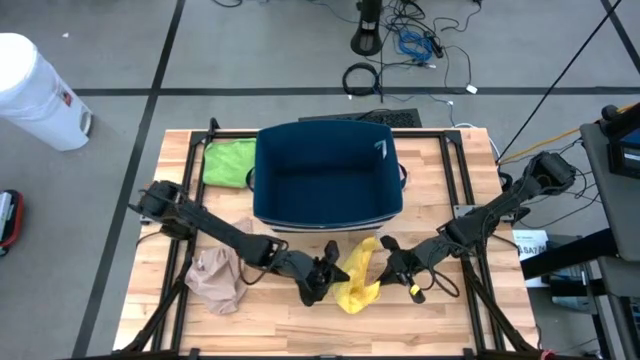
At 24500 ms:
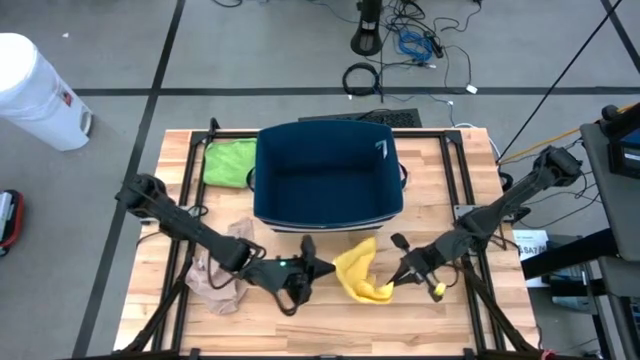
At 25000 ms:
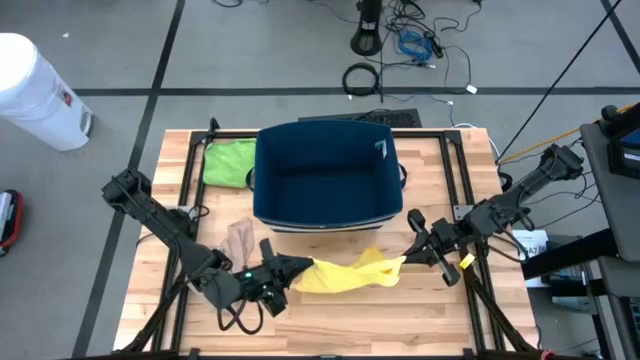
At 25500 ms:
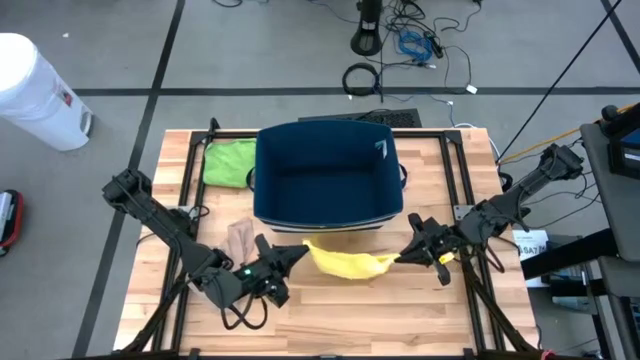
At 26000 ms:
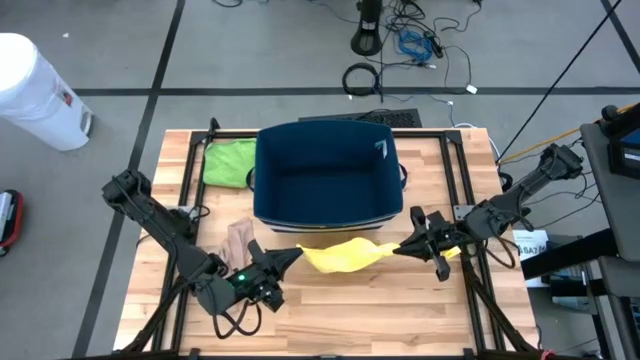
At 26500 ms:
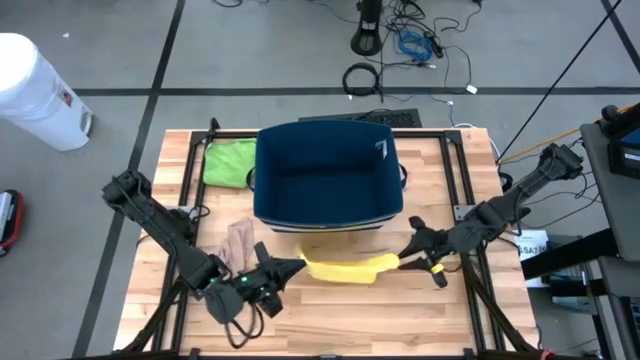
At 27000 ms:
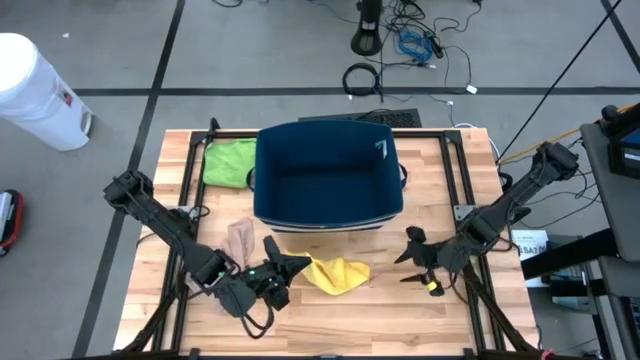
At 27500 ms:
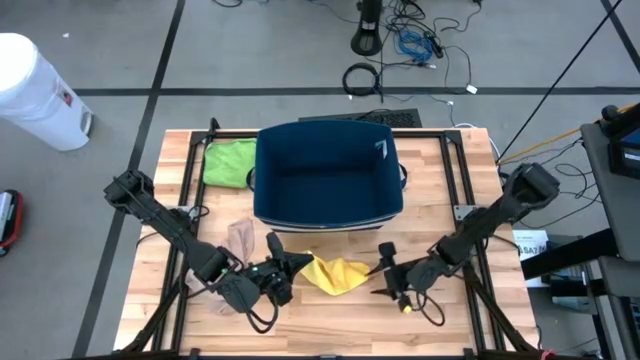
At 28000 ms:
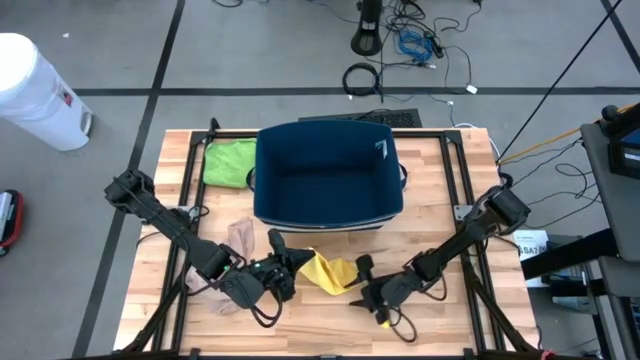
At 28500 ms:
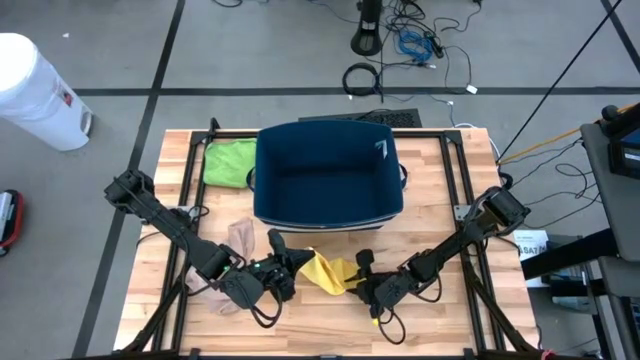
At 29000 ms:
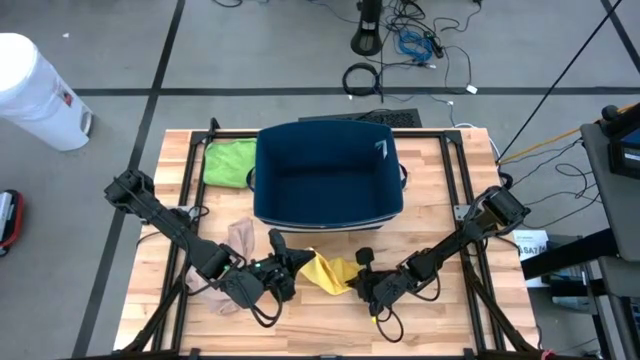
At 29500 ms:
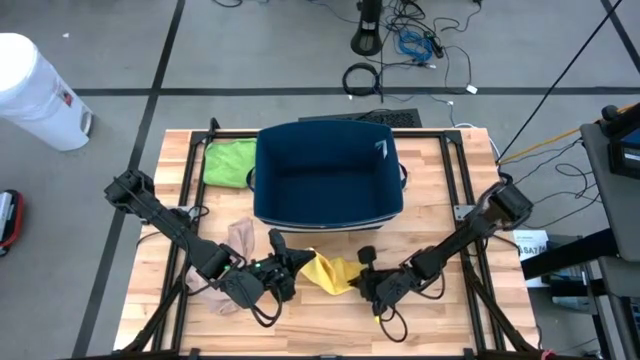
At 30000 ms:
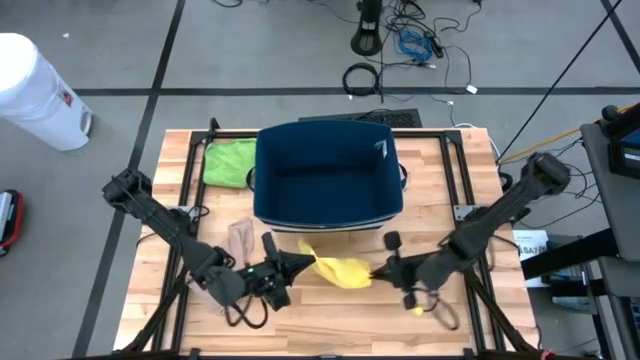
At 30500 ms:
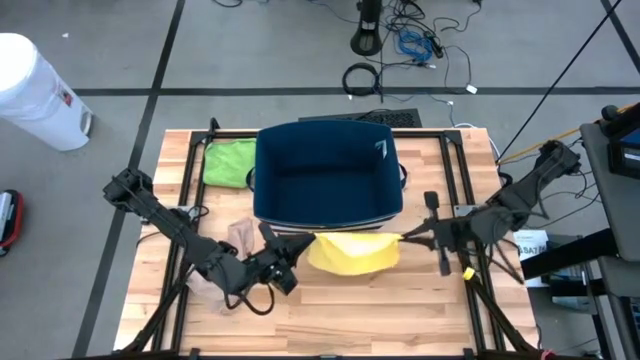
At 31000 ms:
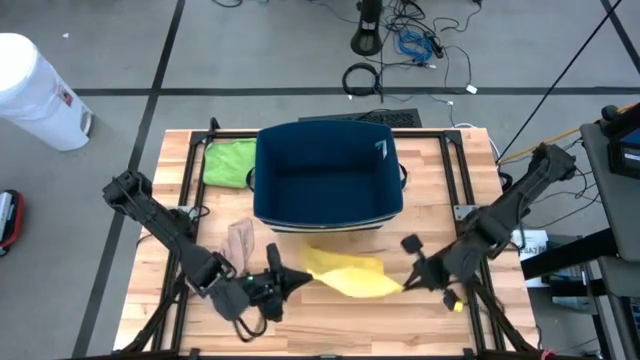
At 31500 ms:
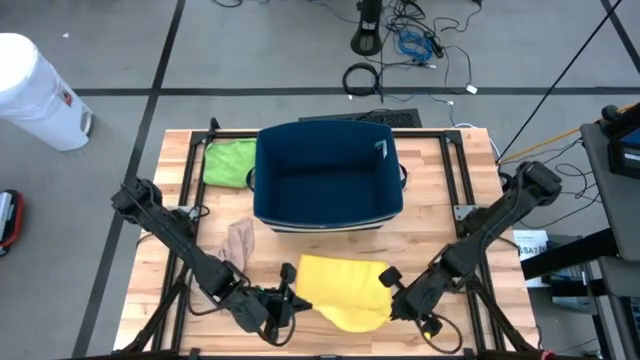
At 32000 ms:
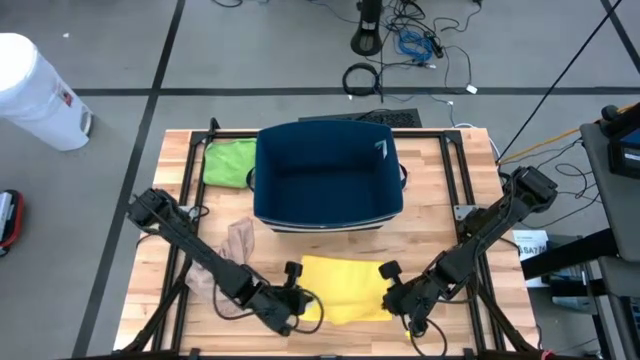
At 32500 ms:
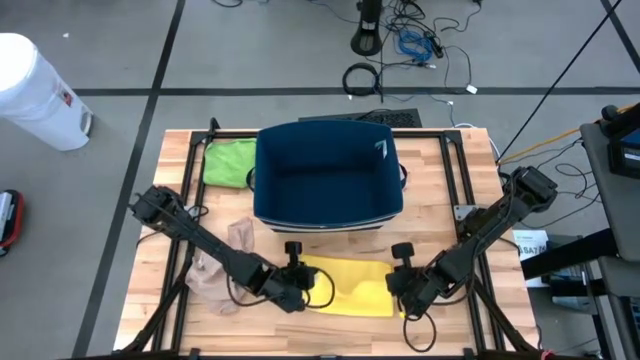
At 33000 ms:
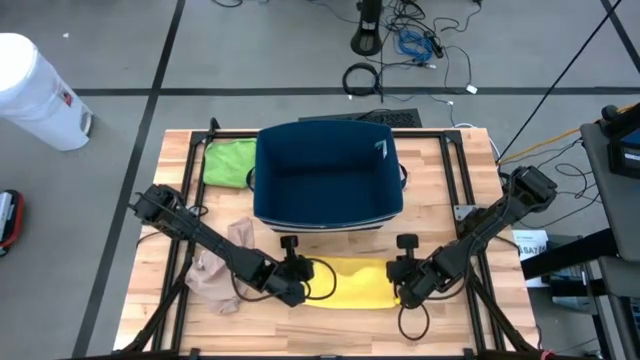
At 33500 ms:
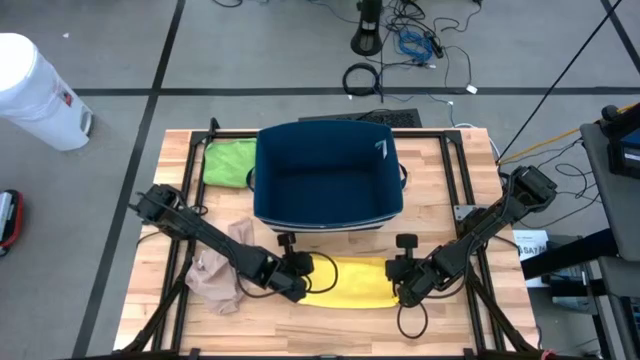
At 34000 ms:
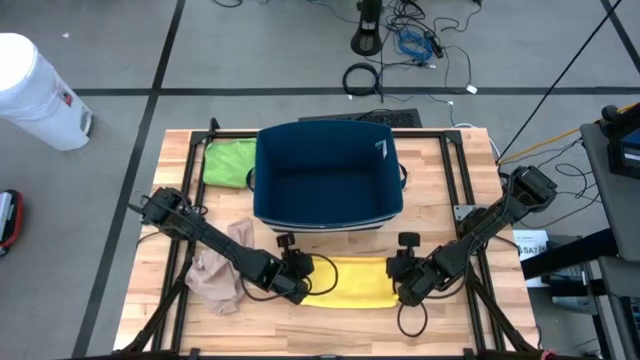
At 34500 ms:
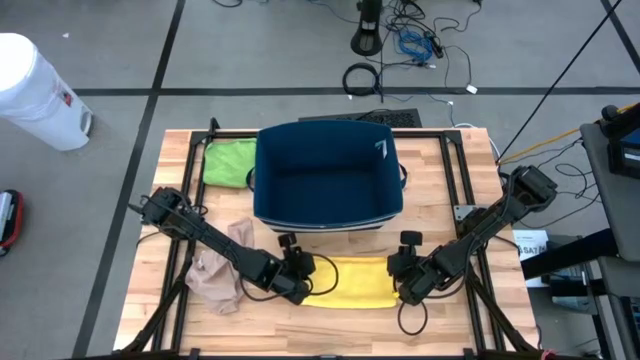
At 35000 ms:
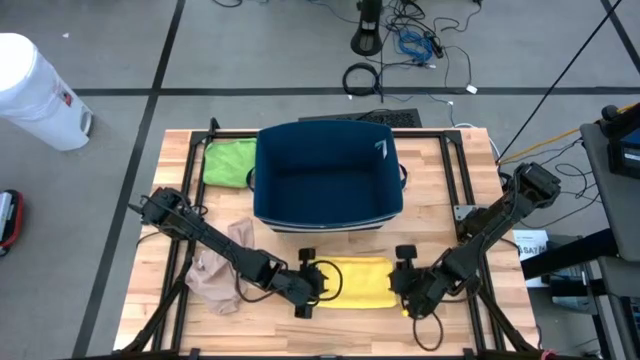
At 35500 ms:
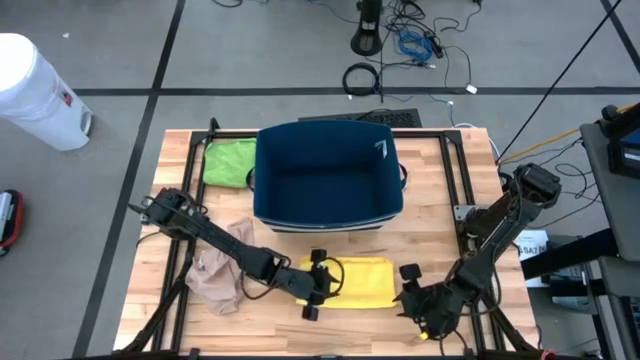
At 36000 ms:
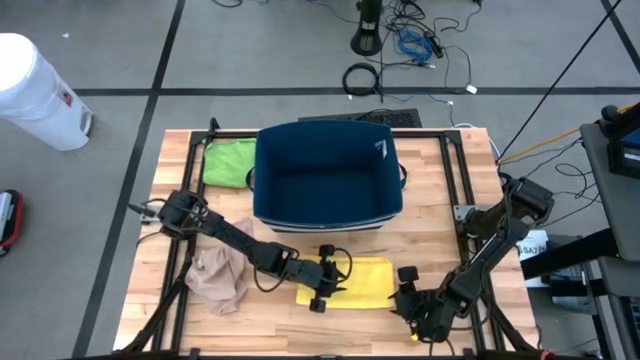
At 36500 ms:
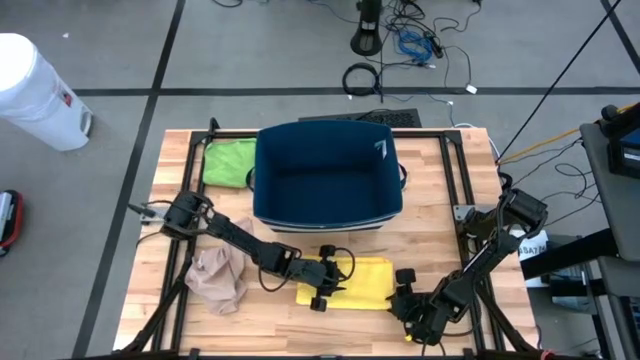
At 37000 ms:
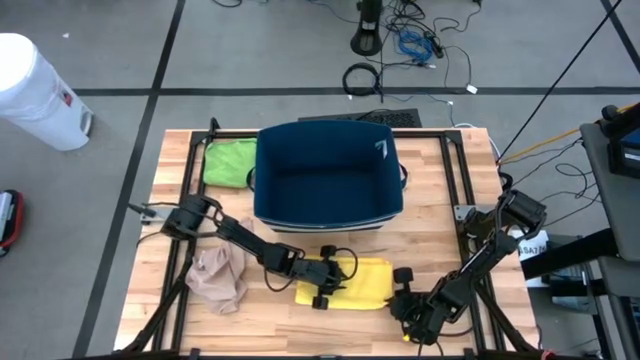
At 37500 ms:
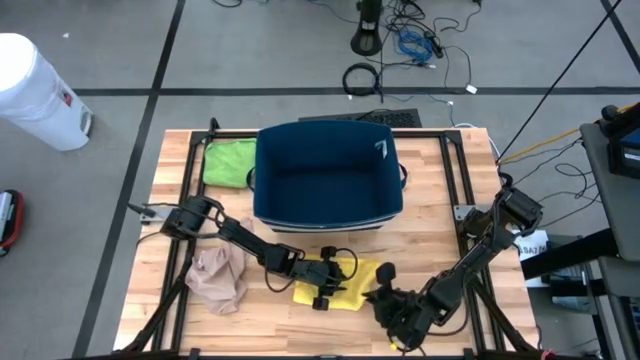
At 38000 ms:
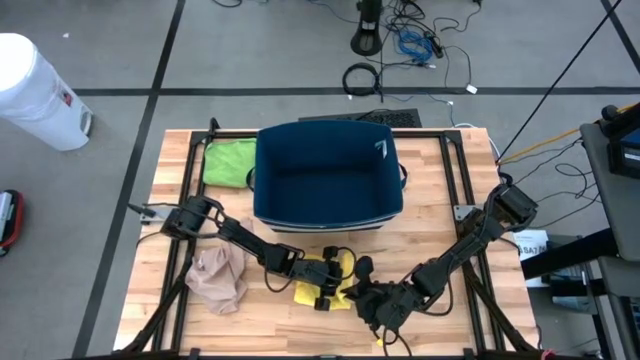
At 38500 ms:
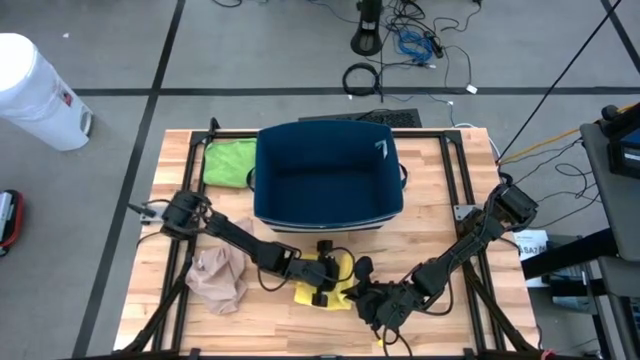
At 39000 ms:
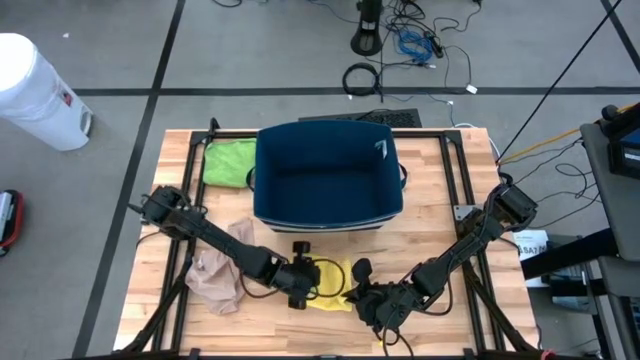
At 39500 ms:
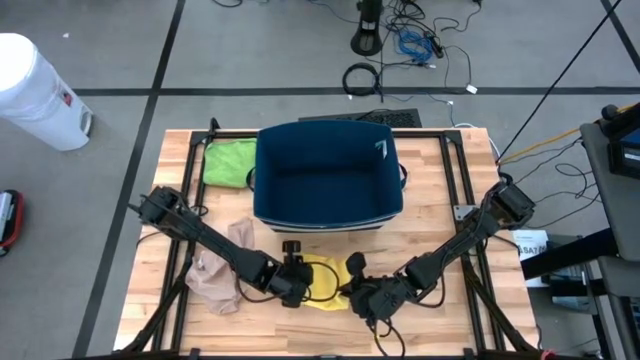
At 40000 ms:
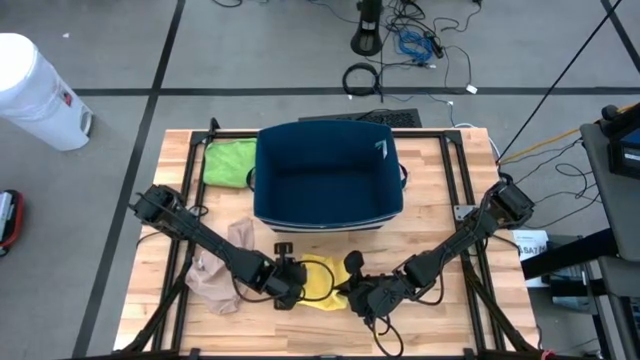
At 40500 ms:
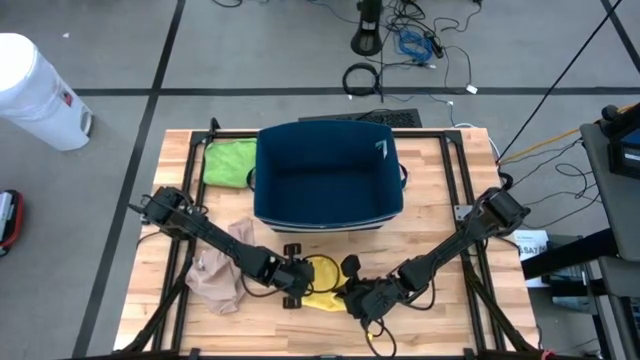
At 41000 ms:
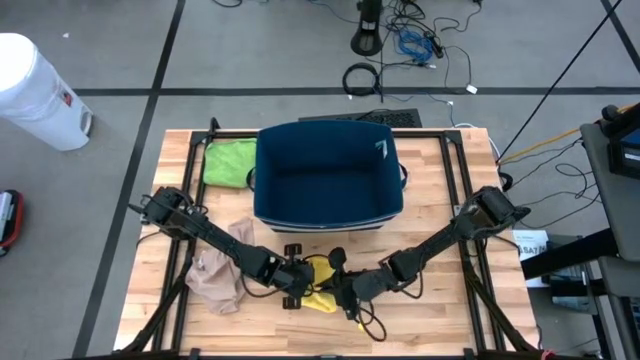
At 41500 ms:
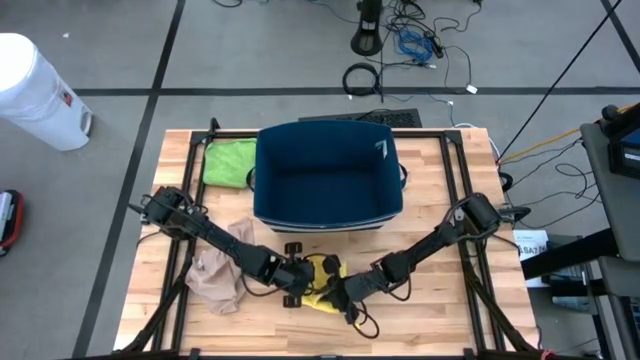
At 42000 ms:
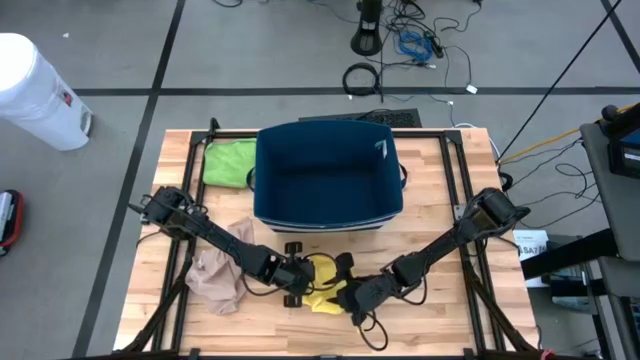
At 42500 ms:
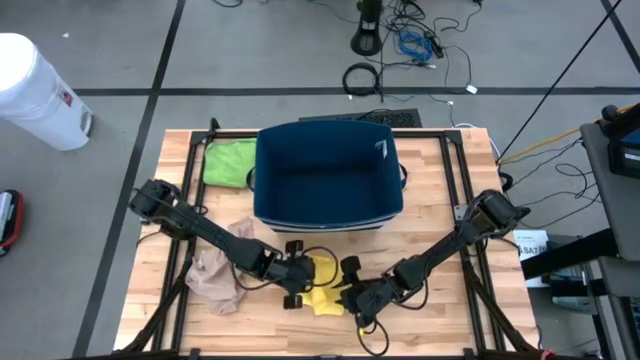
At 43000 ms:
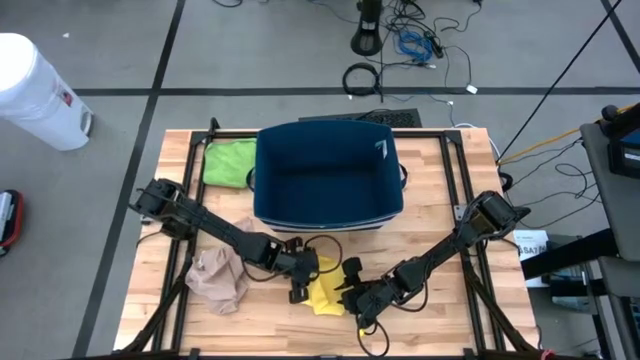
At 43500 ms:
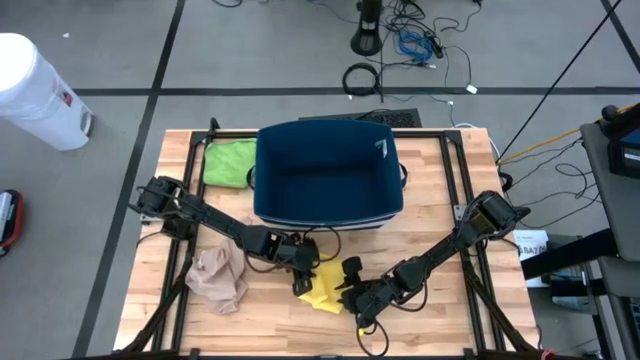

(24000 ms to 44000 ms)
Task: Fold towel
Fold the yellow towel

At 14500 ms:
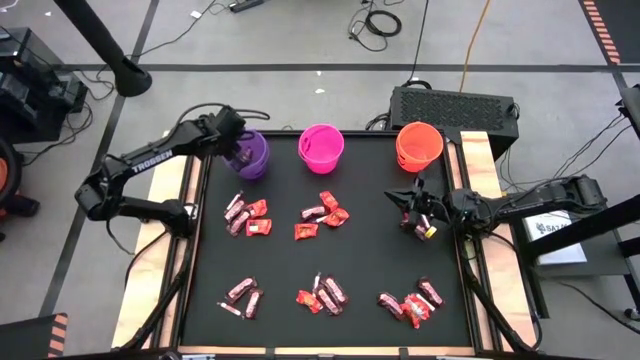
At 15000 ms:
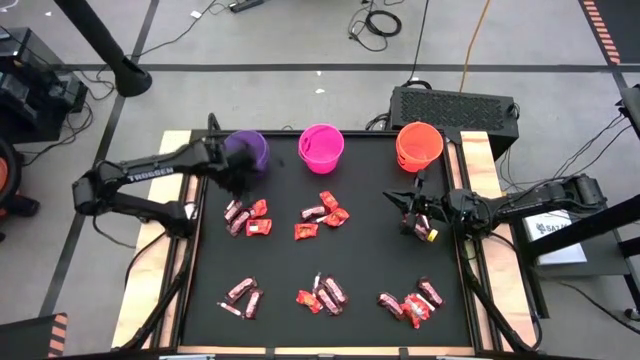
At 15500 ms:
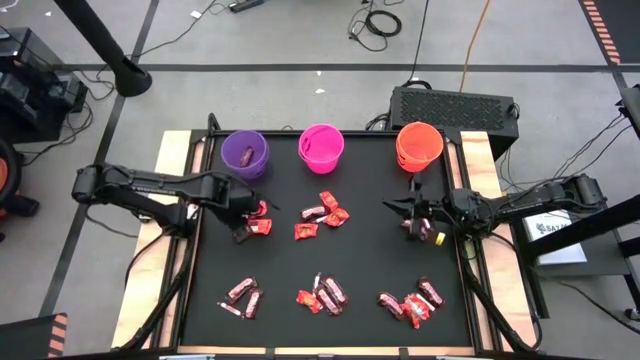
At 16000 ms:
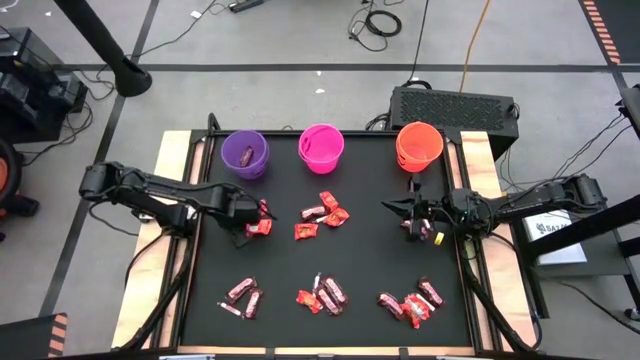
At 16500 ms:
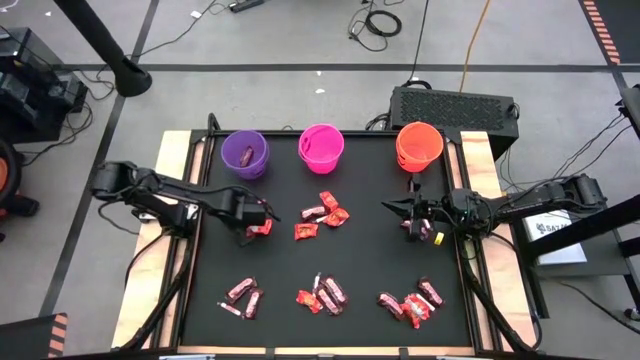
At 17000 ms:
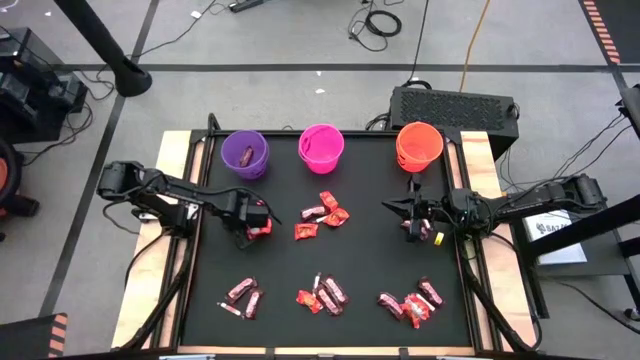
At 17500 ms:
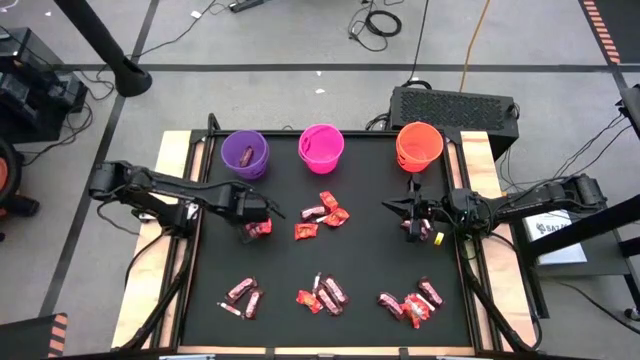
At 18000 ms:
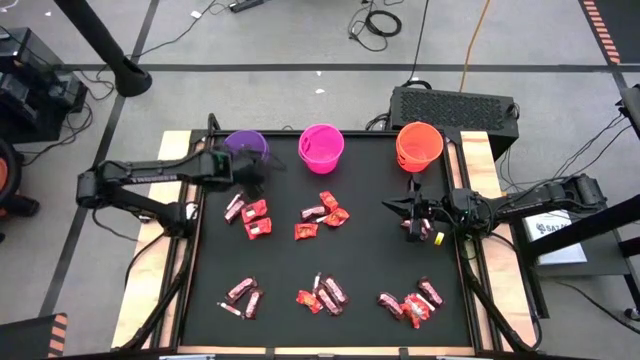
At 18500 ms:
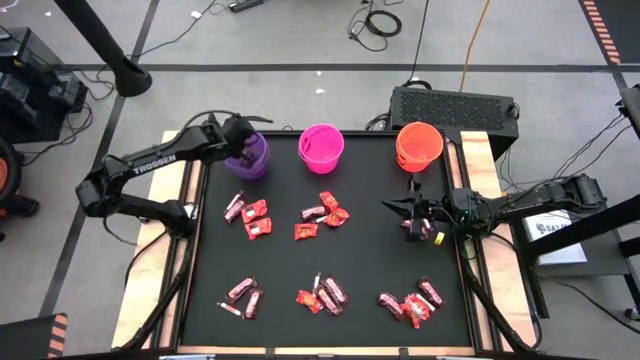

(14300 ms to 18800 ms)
Task: Sort candy by brand, put in halloween buckets
Put the brown chocolate bar into the purple bucket
